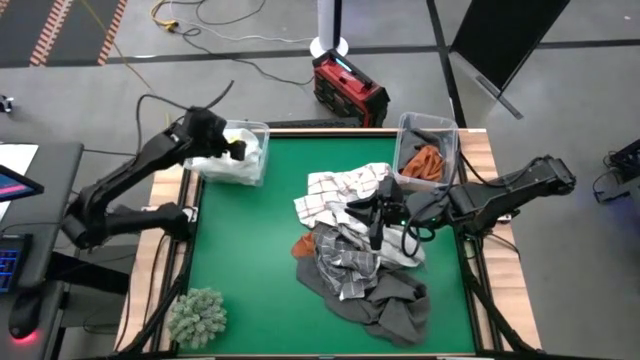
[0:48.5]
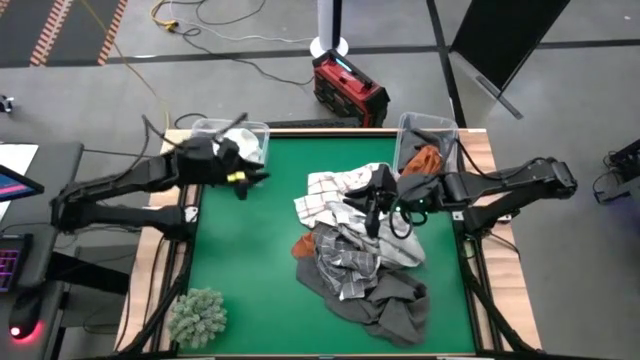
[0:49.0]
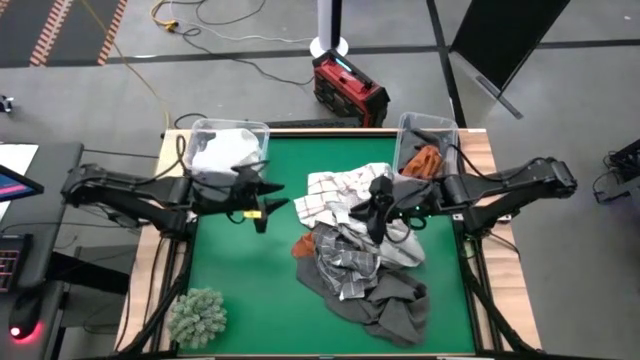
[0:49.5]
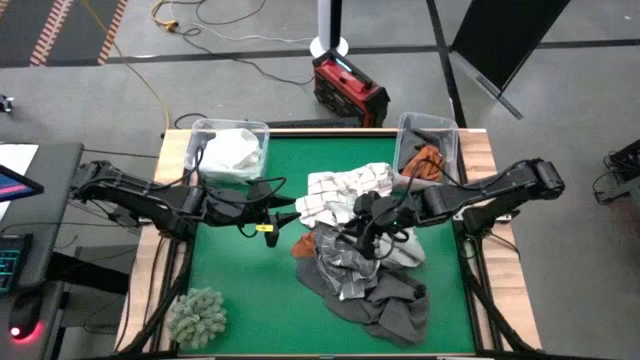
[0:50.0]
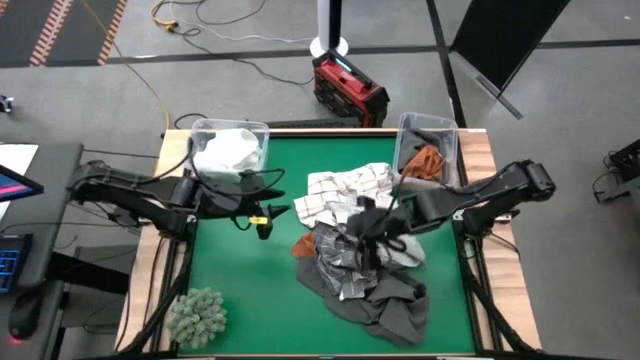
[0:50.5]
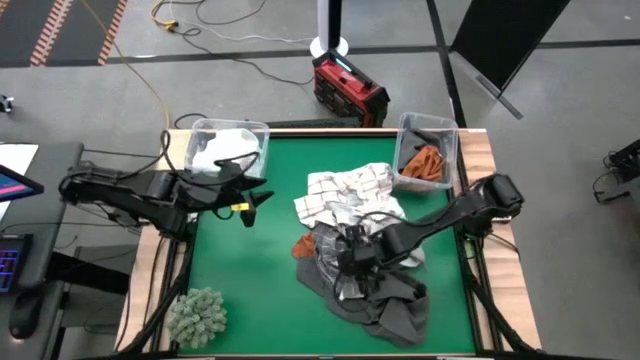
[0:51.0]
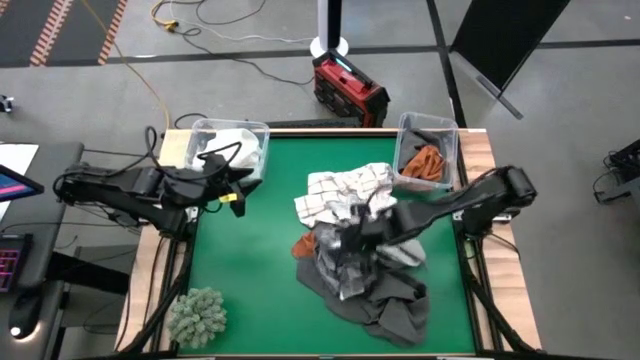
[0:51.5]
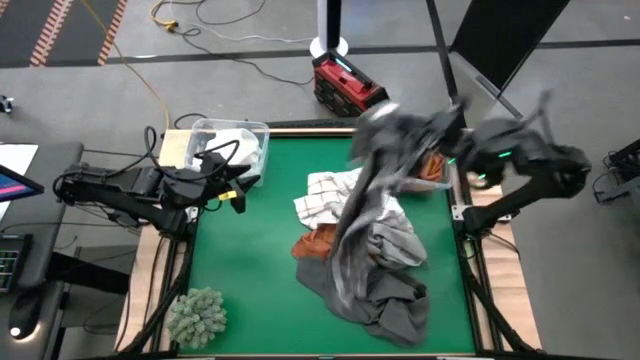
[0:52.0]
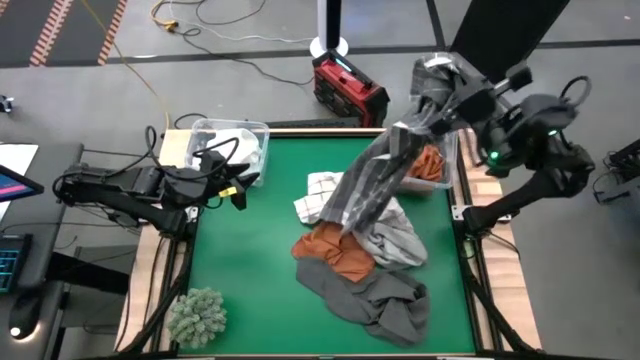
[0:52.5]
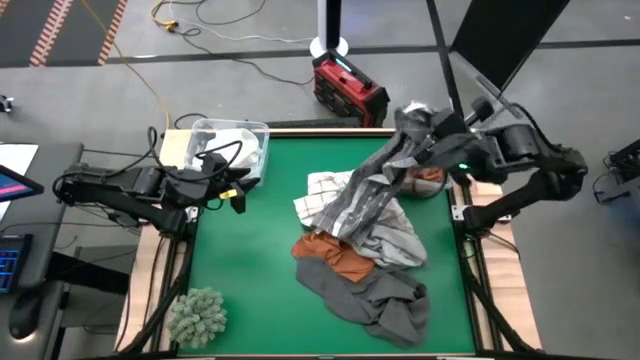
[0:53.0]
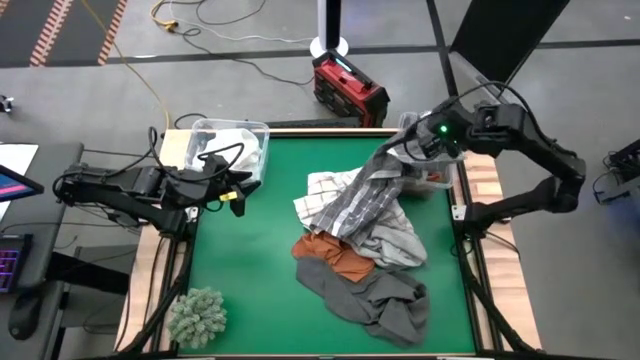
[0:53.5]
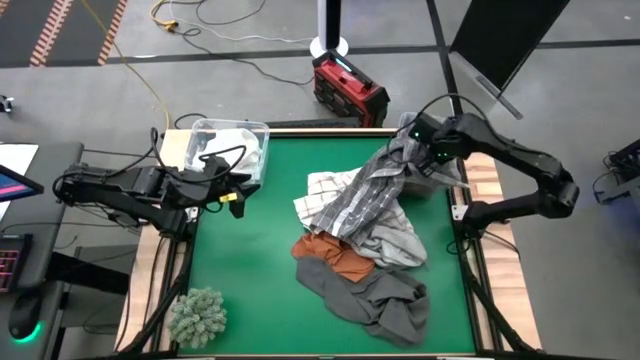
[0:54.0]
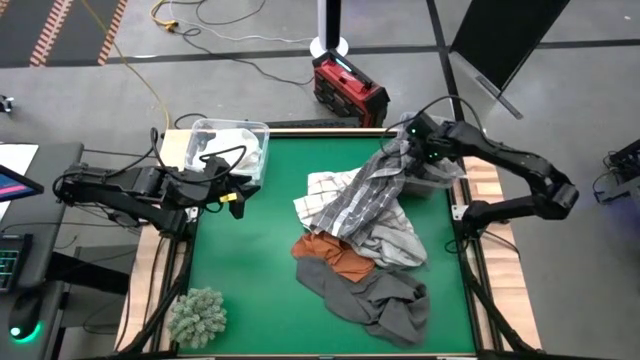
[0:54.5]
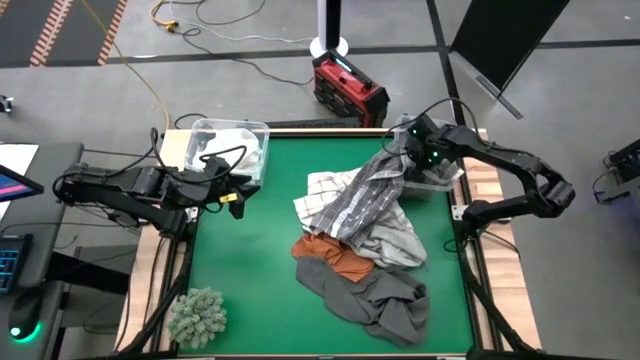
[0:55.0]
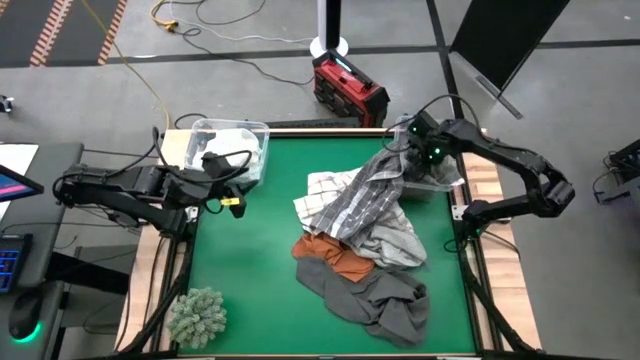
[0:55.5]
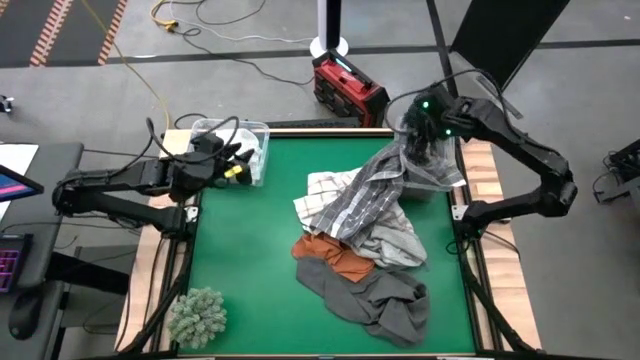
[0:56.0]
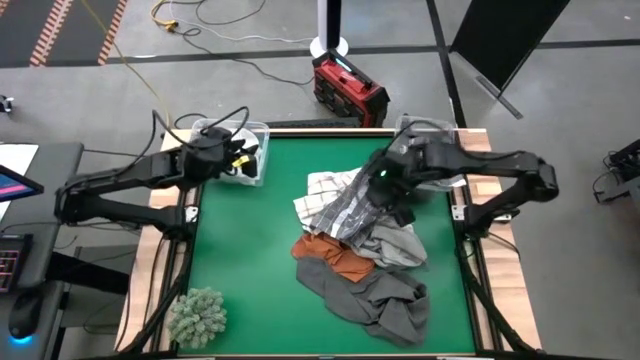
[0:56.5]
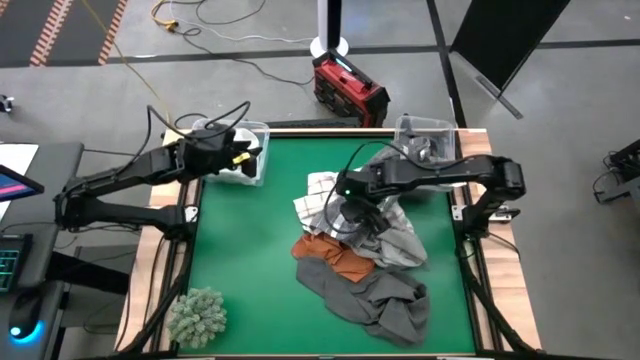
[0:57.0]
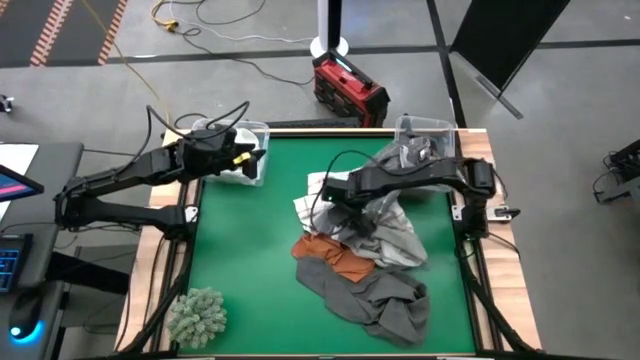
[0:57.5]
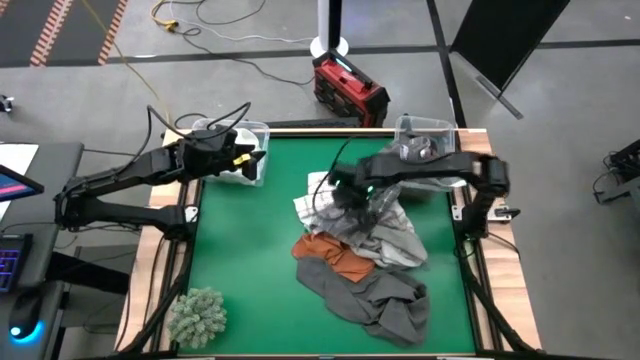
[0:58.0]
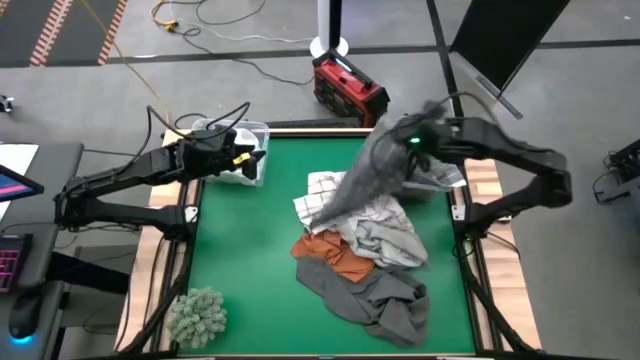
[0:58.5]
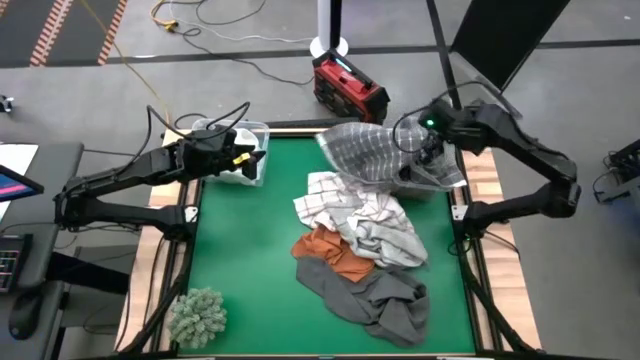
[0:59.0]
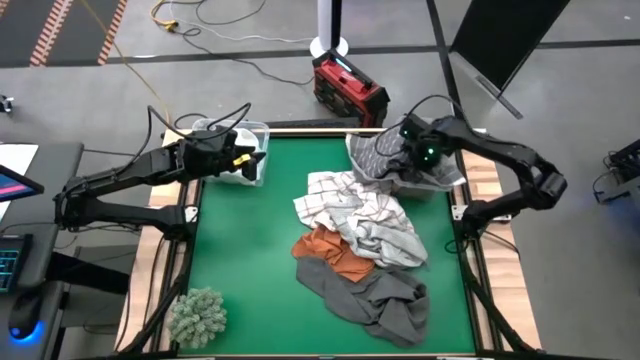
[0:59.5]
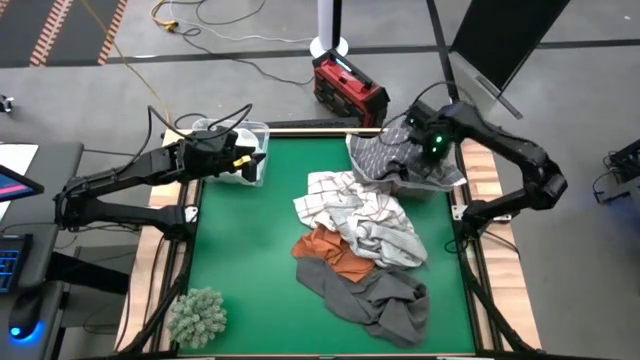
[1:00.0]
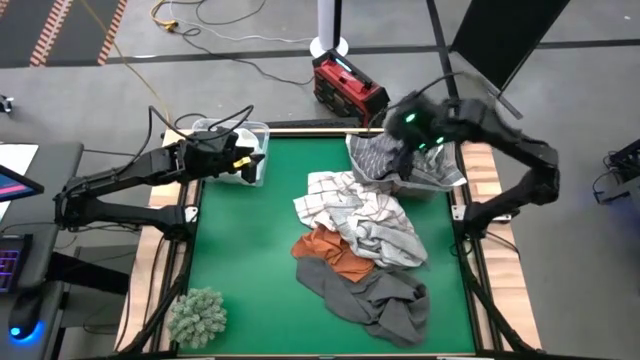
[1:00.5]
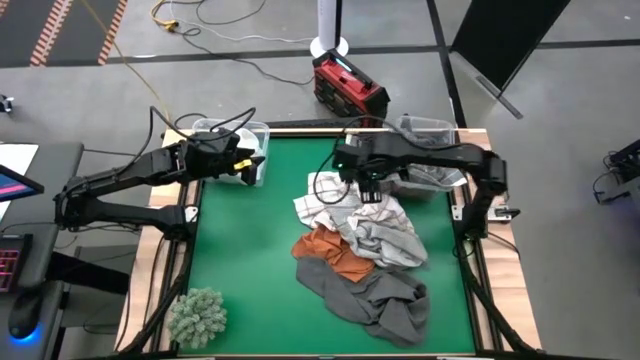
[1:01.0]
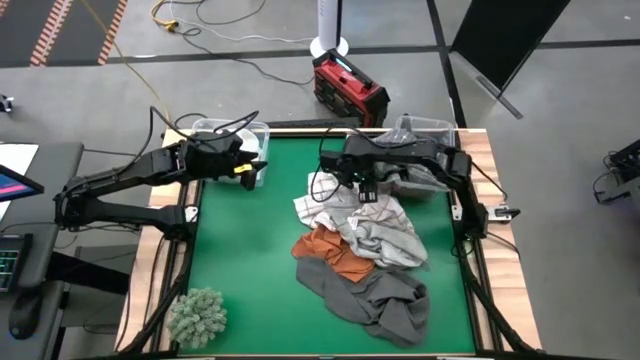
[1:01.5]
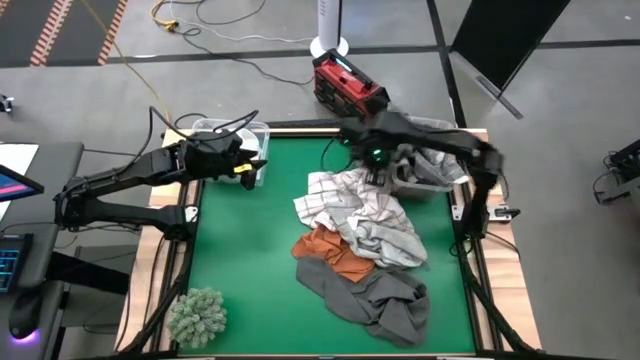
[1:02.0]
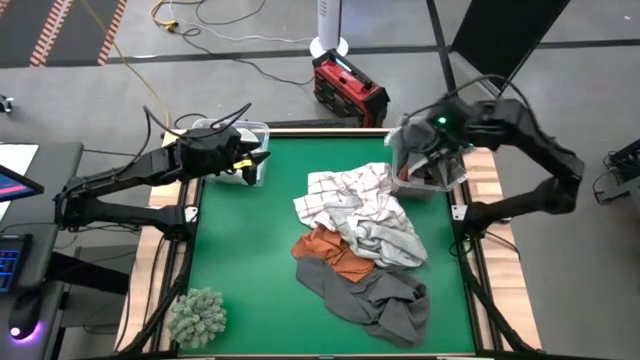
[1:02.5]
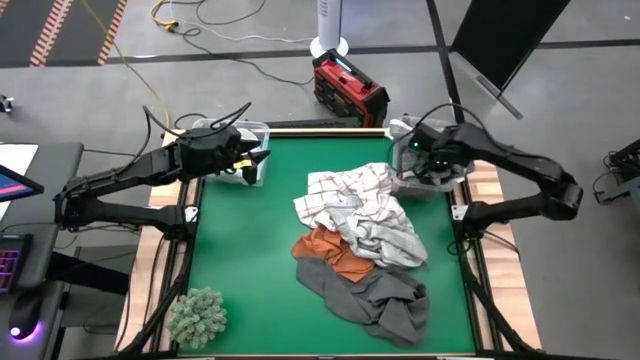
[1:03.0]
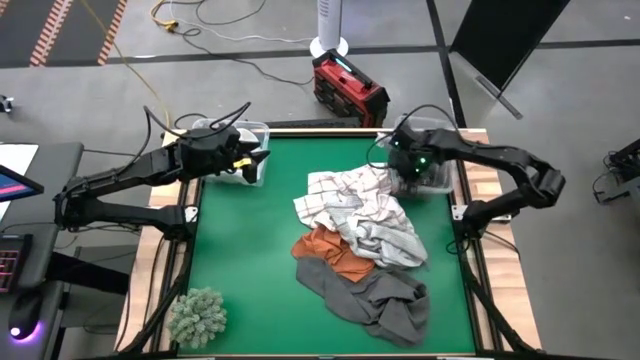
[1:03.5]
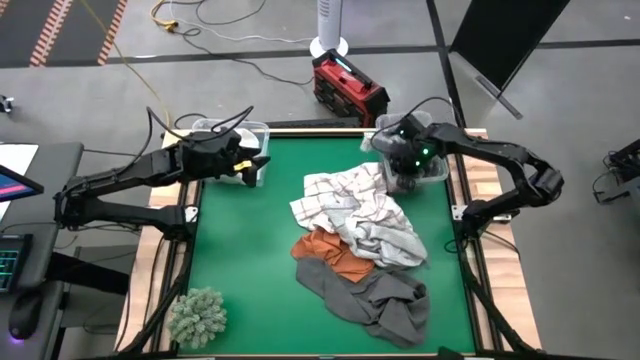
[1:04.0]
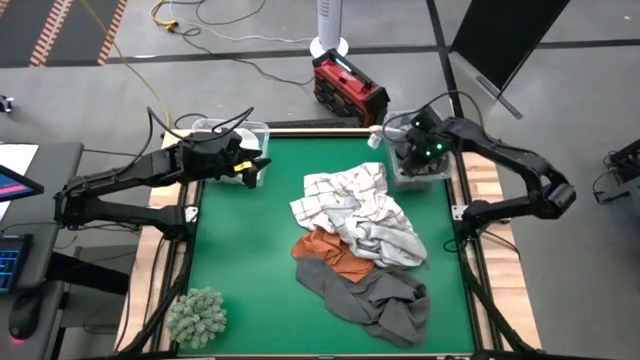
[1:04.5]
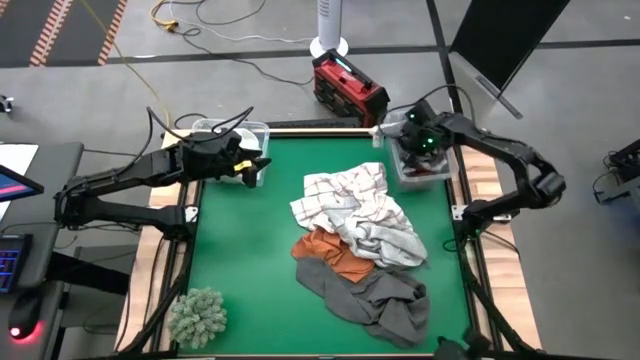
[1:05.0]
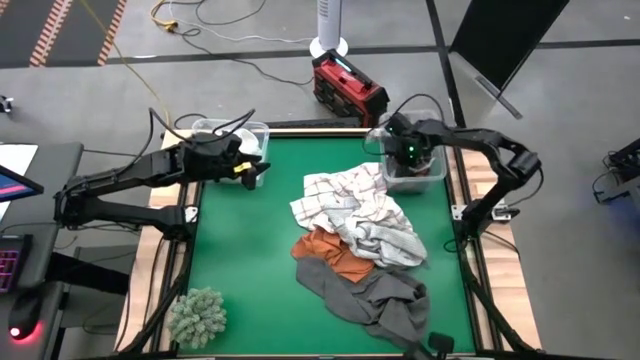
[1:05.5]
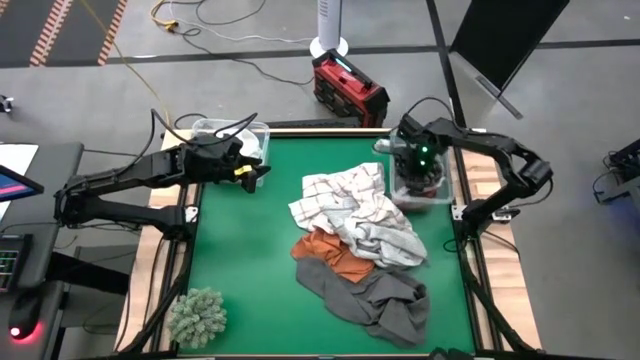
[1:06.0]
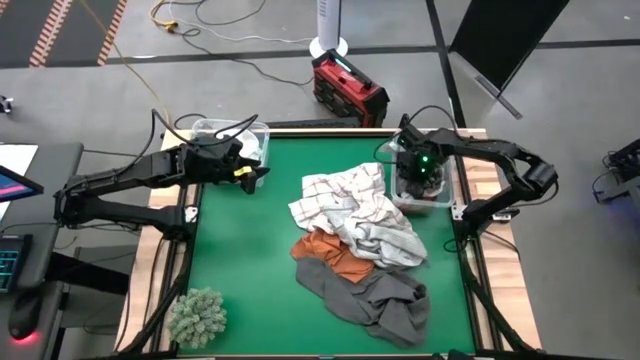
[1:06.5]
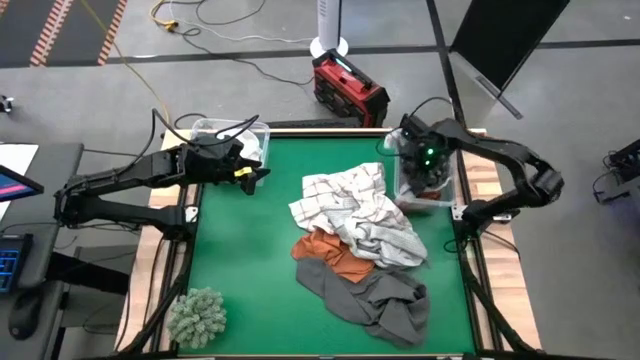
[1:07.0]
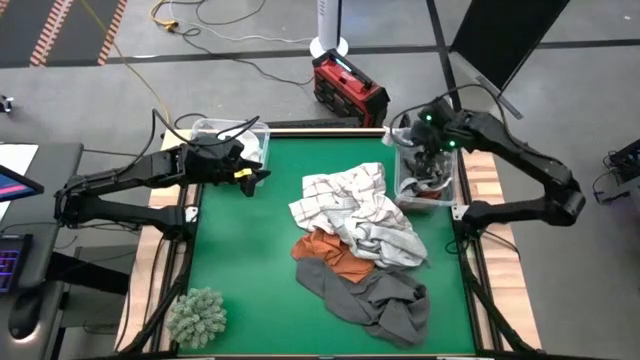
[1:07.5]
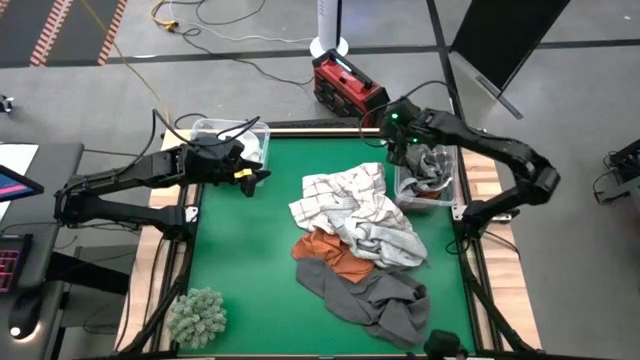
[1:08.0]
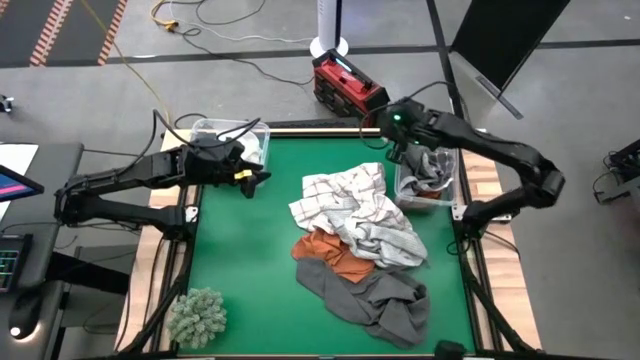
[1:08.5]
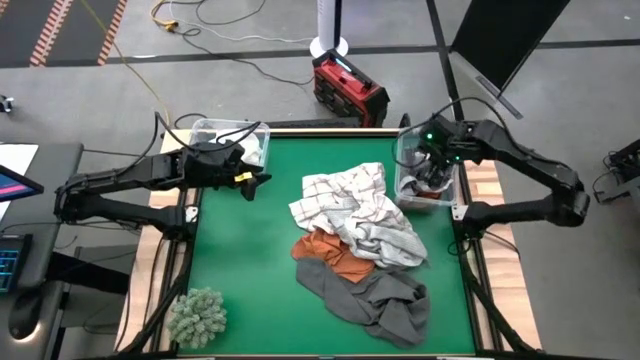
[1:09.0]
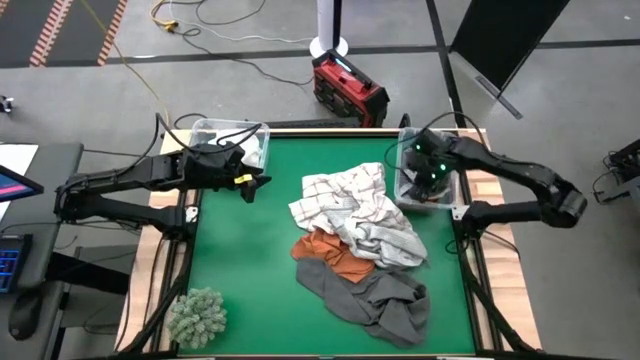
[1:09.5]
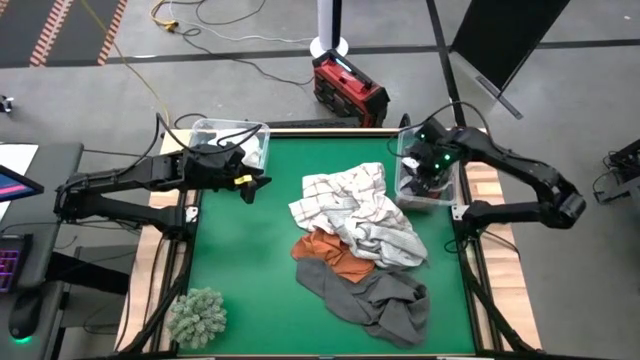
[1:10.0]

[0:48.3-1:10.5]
Task: Sort towels by color in basket
Put the gray patterned towel into the right transparent bin
